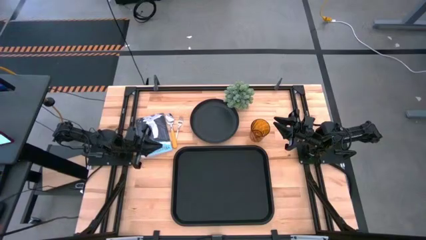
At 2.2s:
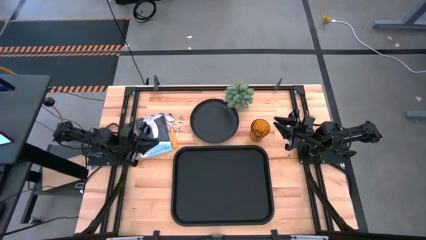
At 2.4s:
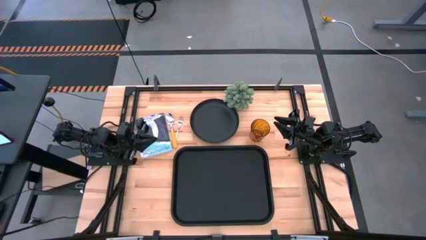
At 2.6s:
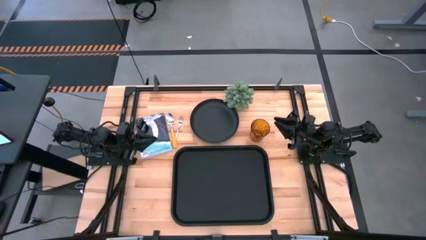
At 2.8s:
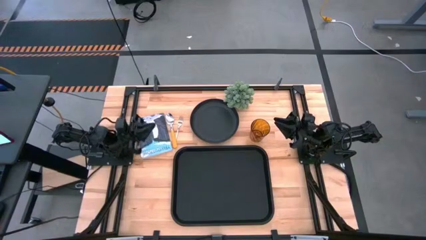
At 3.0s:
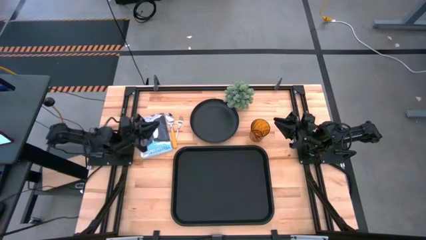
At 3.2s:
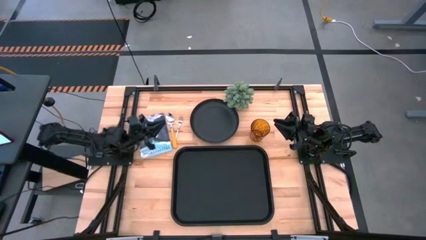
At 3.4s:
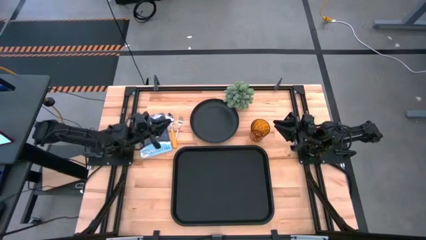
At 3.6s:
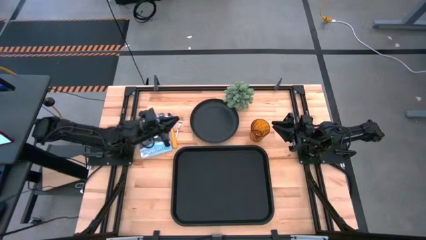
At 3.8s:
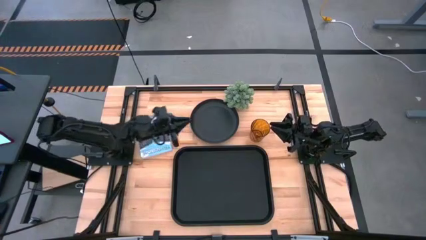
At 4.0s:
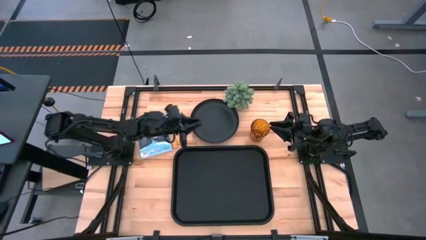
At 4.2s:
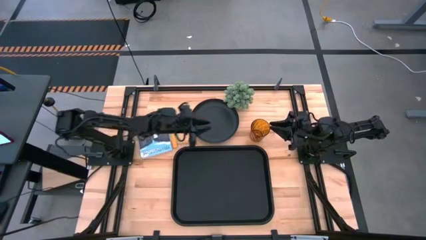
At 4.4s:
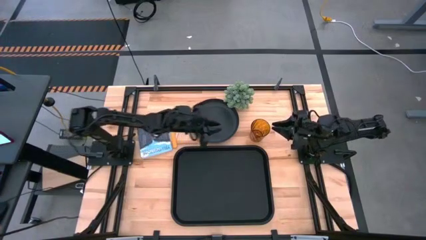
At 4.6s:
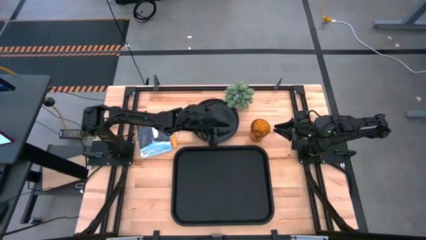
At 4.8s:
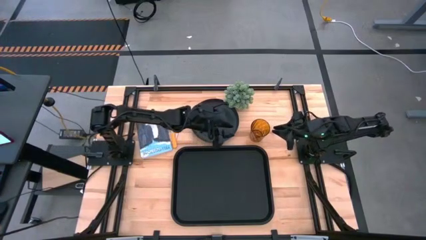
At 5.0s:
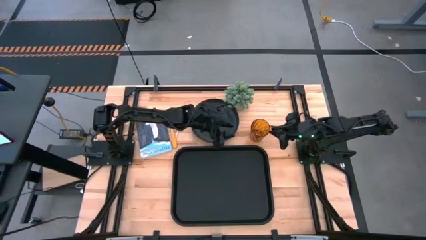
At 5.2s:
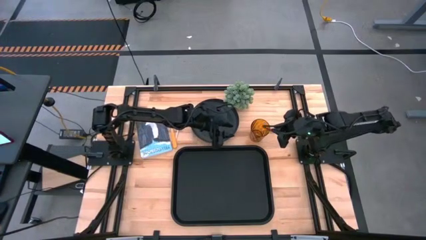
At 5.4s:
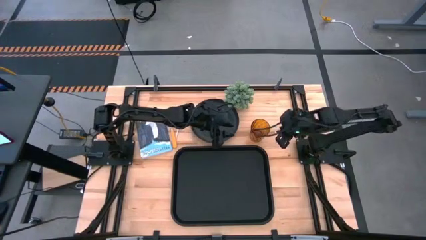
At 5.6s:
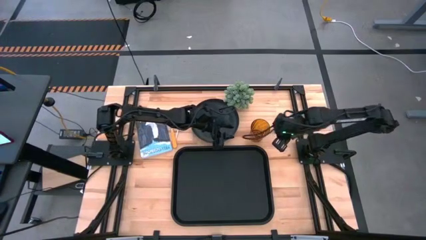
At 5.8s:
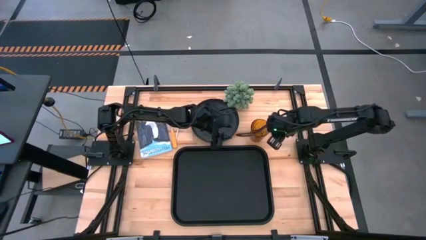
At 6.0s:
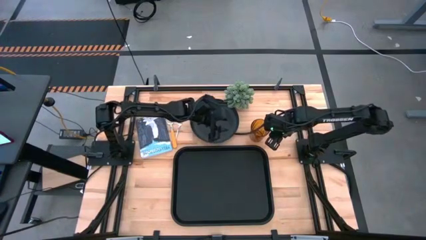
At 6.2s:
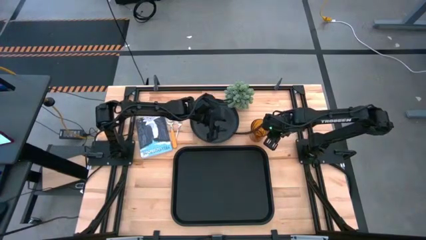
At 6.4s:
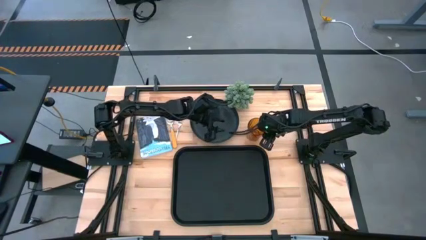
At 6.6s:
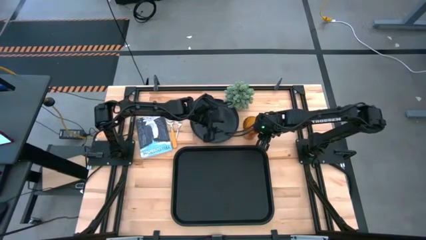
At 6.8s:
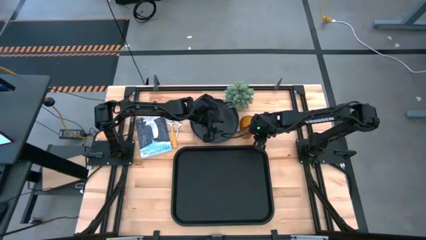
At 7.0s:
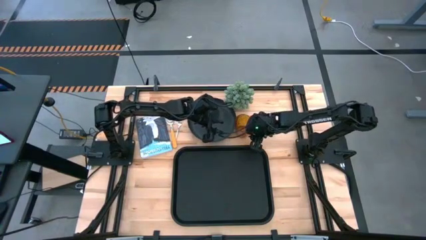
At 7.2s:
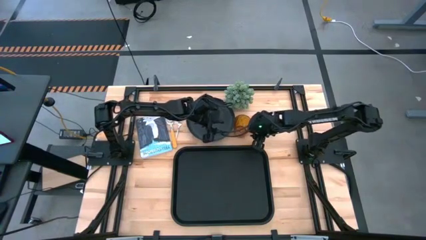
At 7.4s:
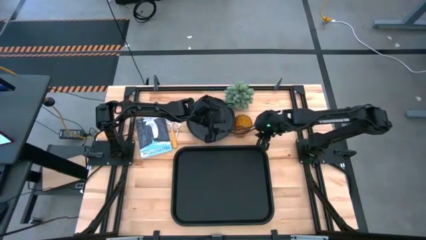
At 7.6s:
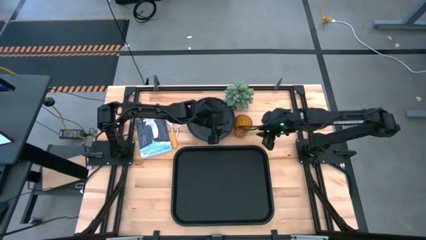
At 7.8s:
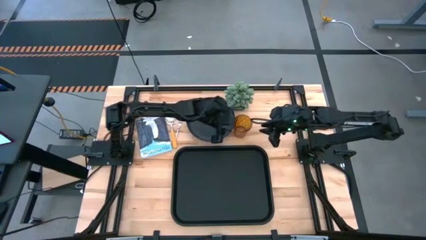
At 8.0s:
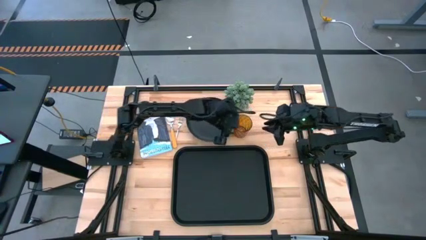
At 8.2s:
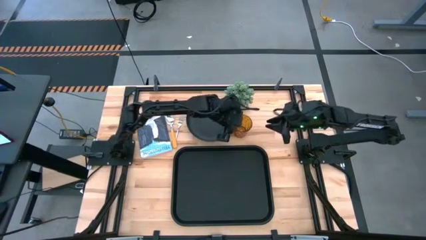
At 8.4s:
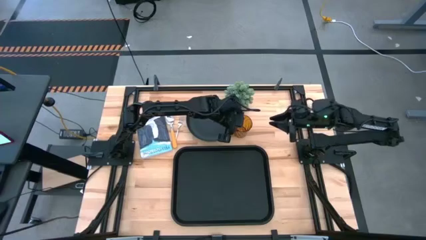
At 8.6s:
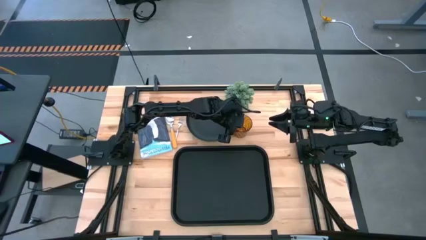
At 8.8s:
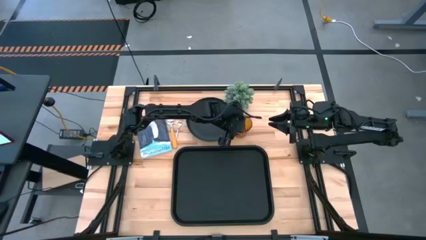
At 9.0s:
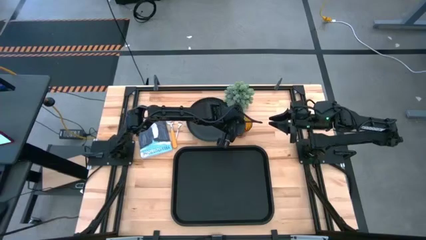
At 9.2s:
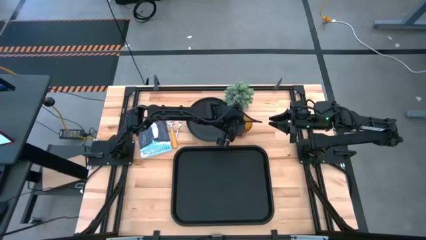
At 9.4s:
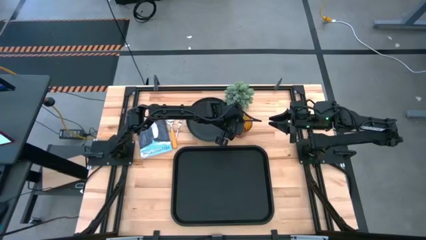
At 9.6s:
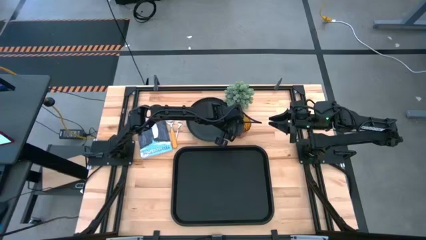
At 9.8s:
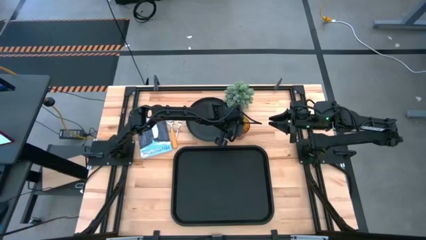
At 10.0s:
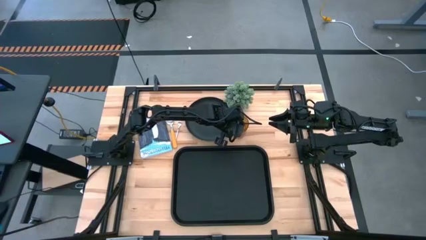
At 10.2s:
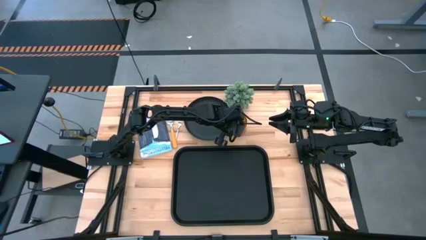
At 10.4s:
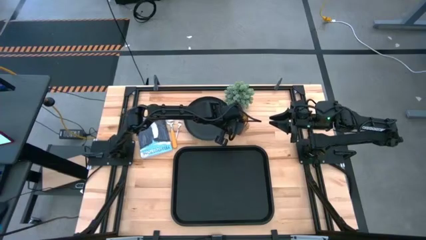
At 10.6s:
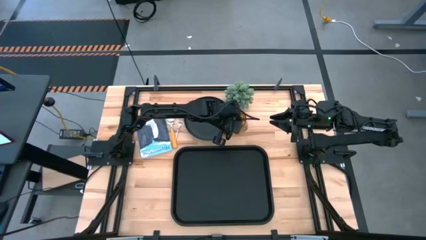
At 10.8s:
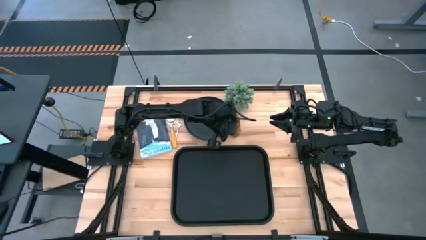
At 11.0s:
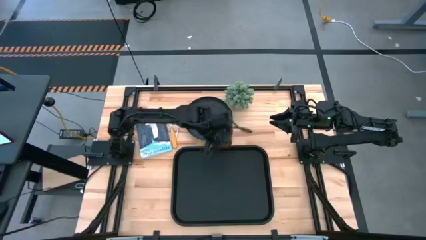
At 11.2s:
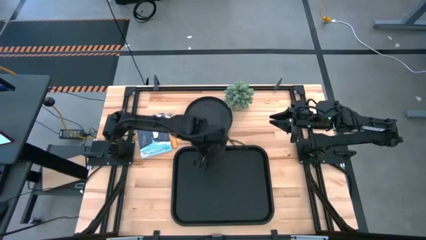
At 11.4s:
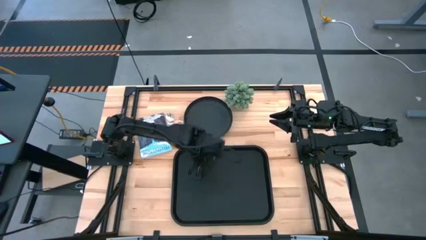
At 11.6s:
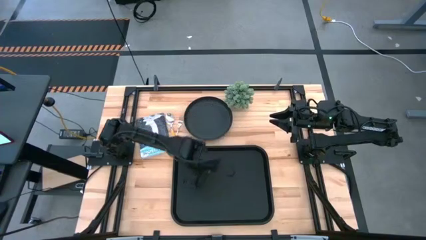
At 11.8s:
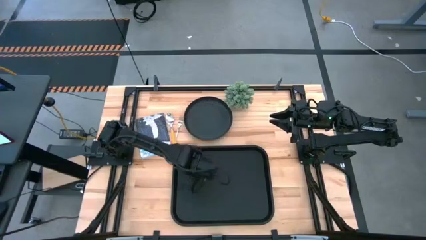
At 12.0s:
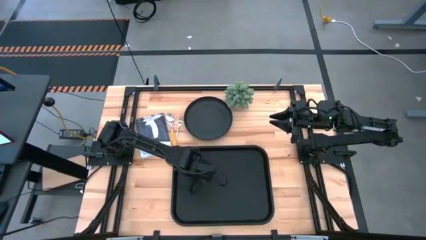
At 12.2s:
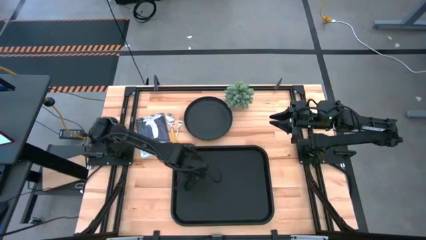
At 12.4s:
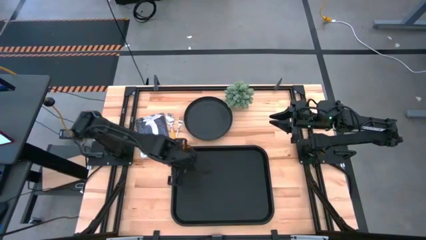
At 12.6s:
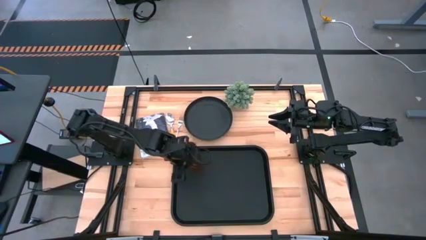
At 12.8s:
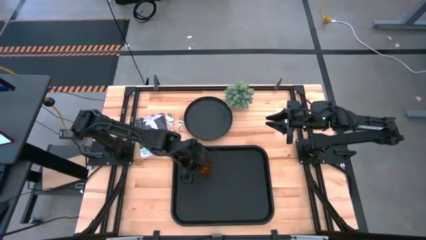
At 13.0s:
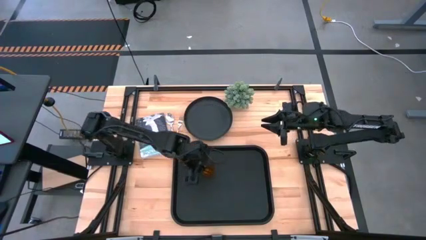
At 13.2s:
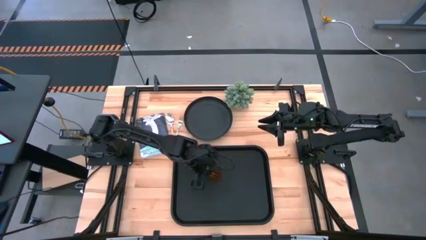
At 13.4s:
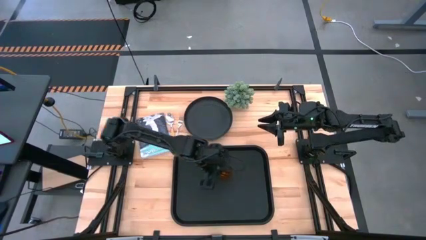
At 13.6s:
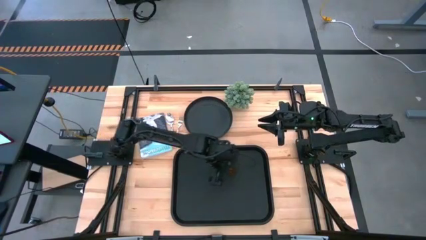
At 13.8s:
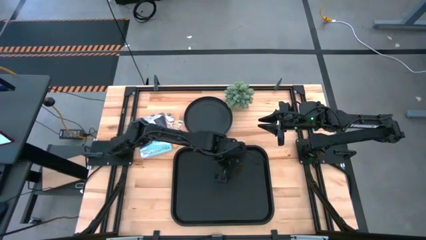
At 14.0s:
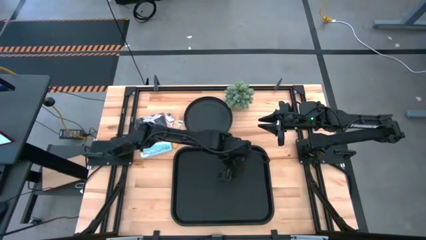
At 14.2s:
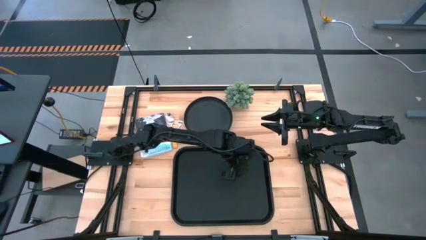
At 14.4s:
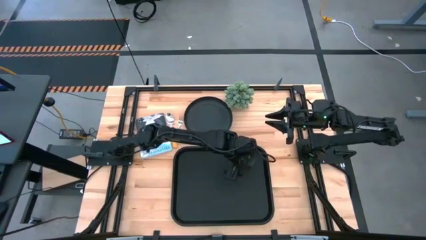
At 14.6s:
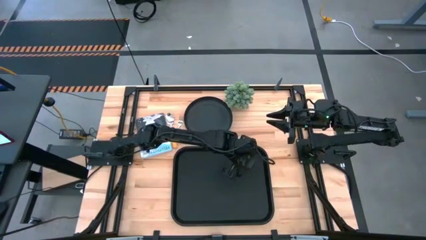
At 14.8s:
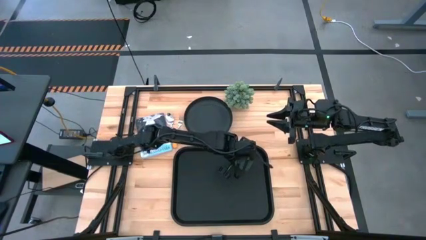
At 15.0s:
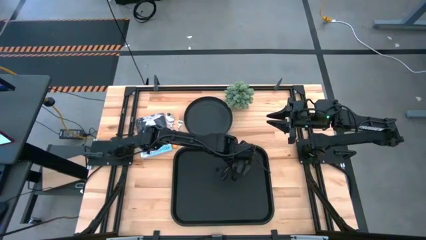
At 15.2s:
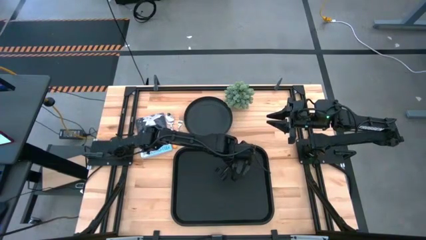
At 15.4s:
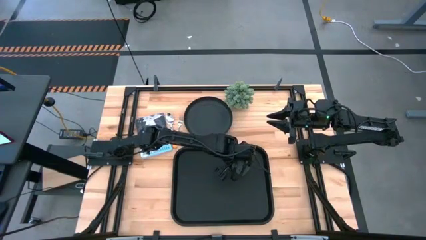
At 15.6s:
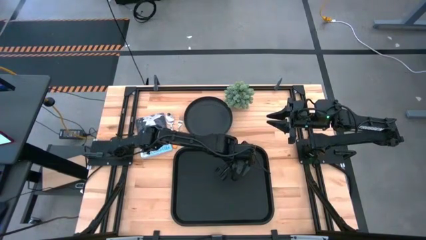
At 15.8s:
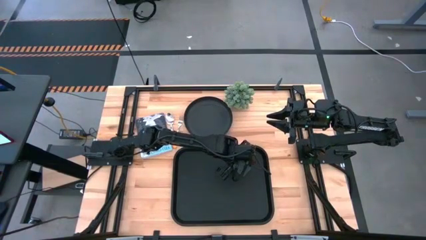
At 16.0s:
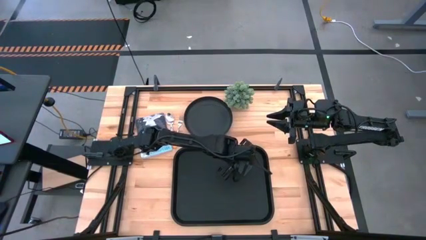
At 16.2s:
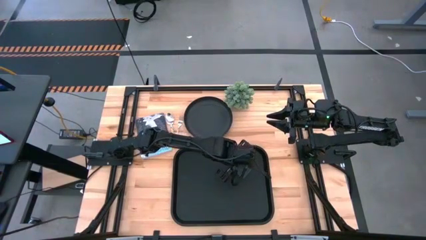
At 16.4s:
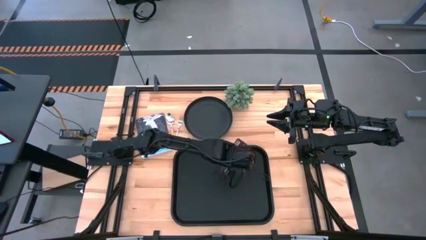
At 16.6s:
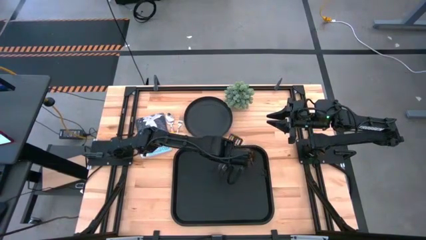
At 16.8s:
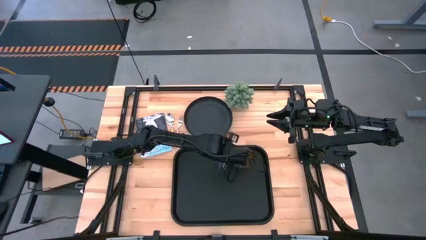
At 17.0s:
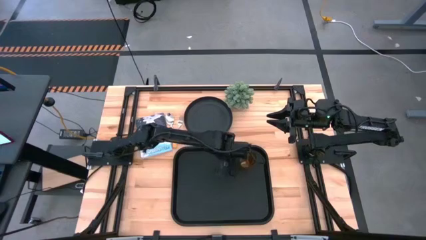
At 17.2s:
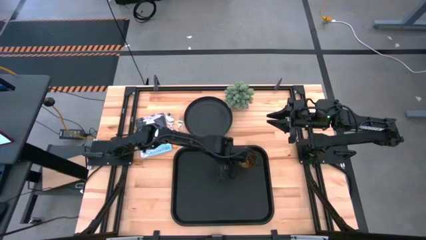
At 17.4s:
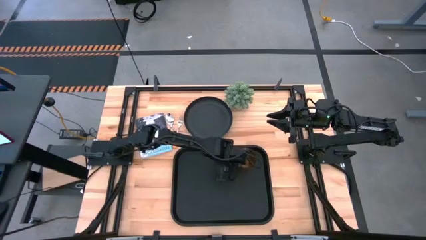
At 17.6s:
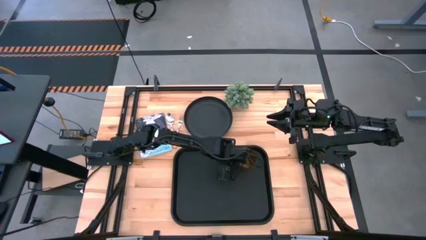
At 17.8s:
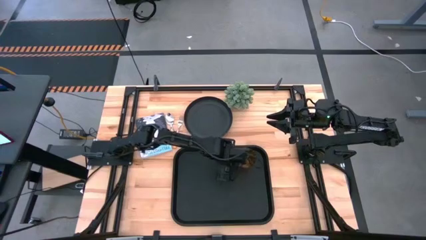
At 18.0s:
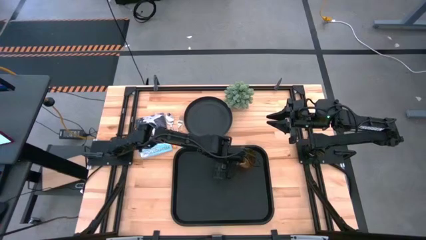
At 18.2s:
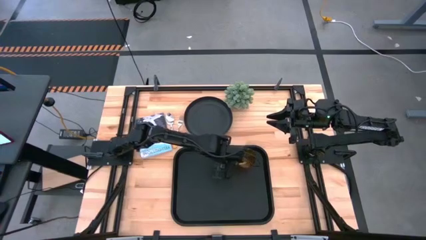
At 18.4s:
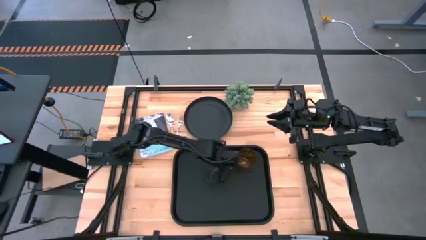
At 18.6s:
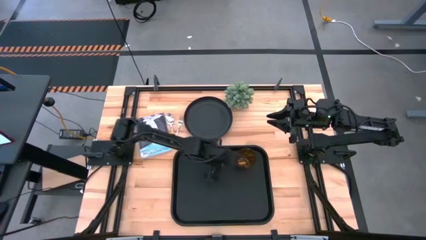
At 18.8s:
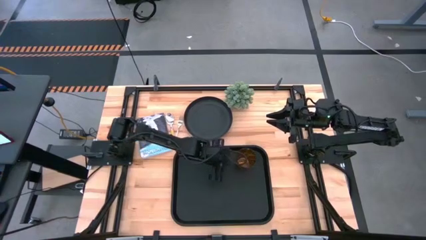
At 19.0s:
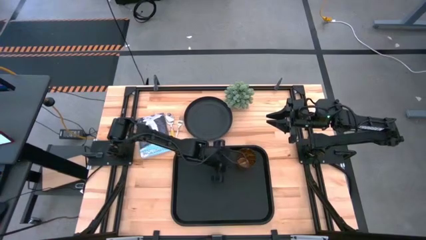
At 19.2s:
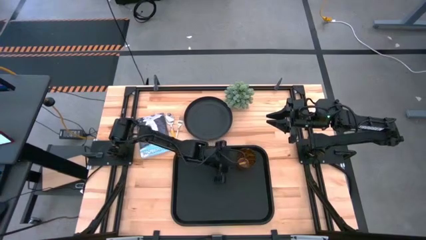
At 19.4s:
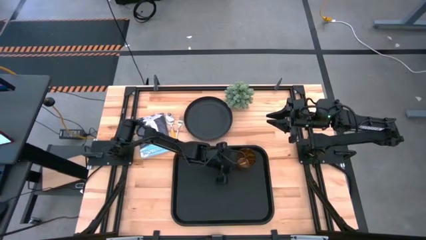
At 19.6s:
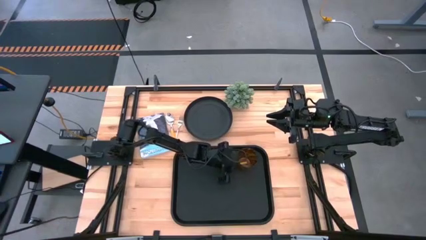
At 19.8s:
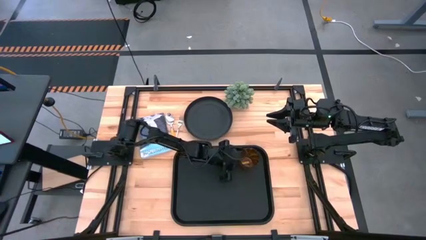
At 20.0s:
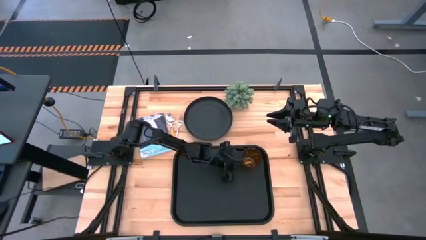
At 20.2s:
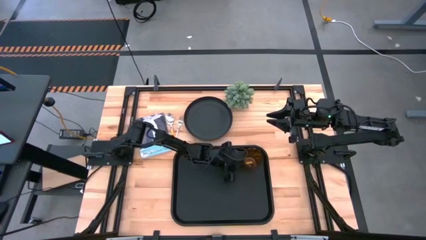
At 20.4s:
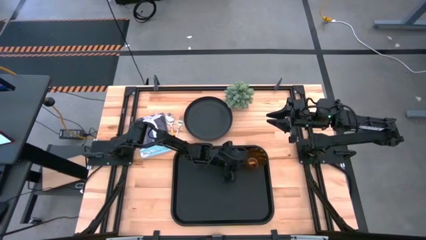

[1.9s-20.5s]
Task: Pick and place plate/cup/fork/spoon on tray
Put the yellow cup on the black serving tray
